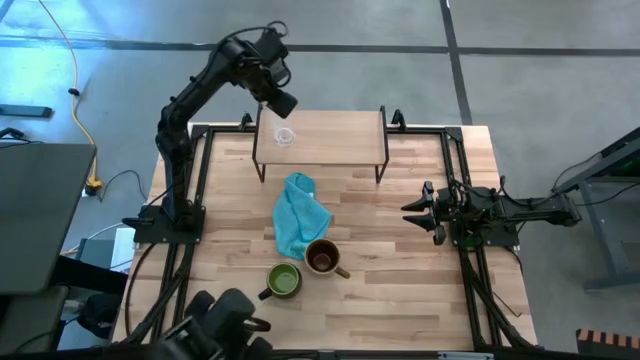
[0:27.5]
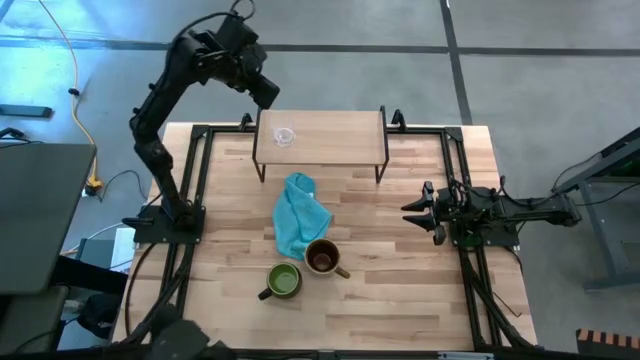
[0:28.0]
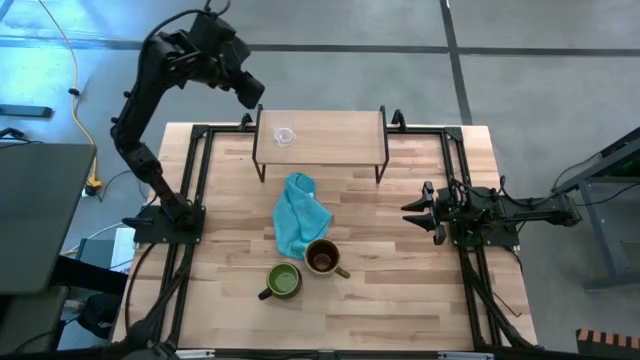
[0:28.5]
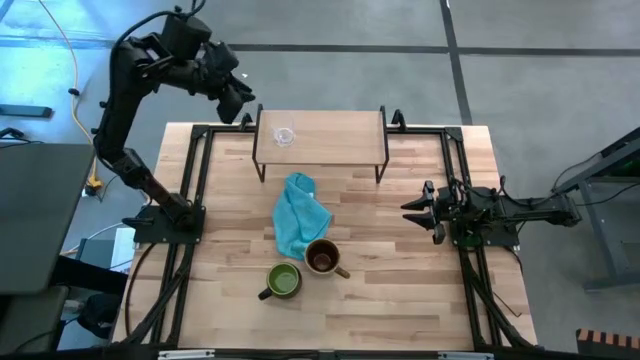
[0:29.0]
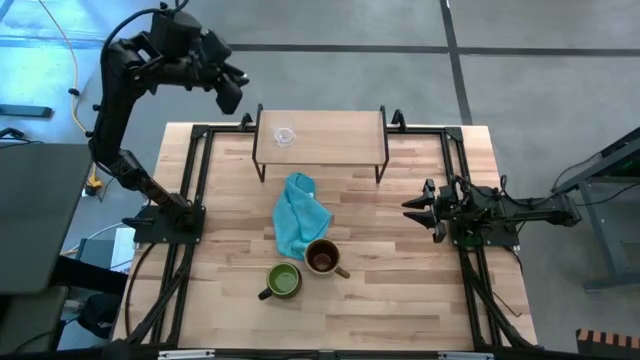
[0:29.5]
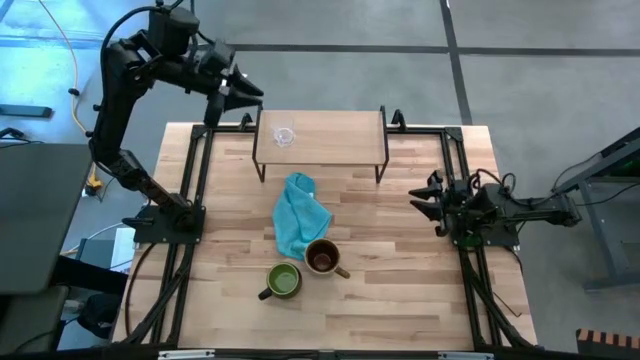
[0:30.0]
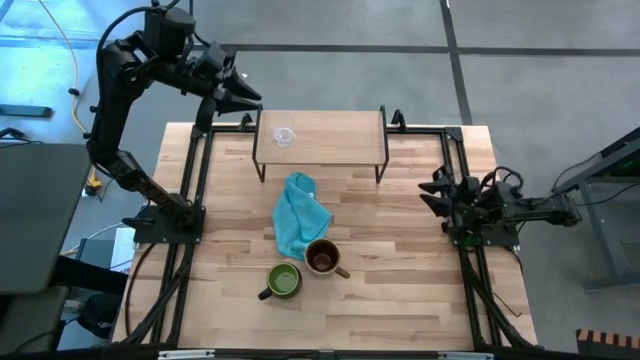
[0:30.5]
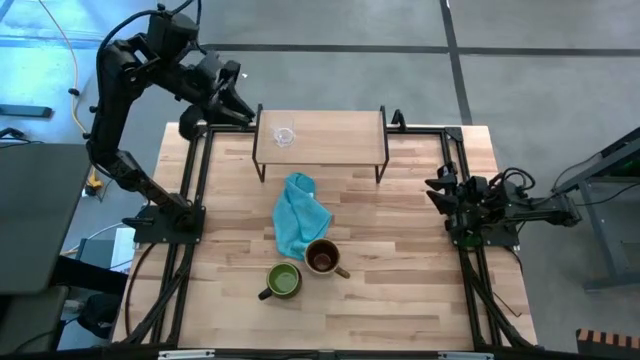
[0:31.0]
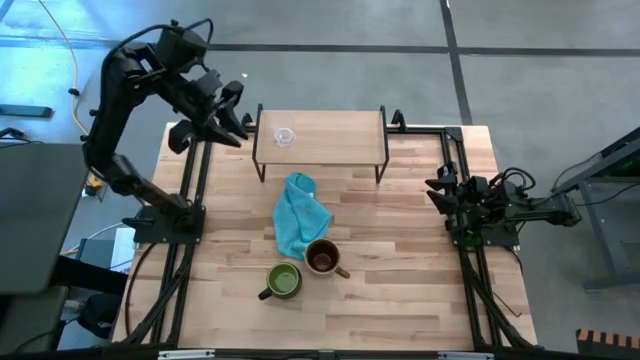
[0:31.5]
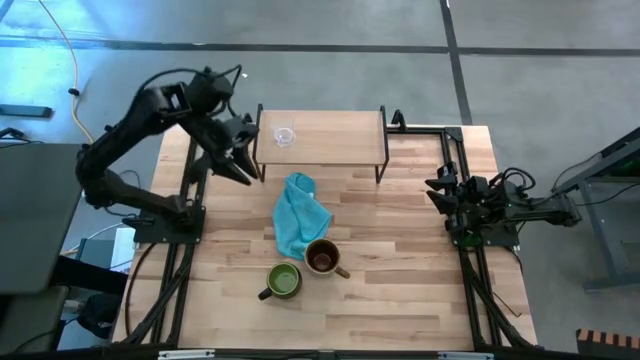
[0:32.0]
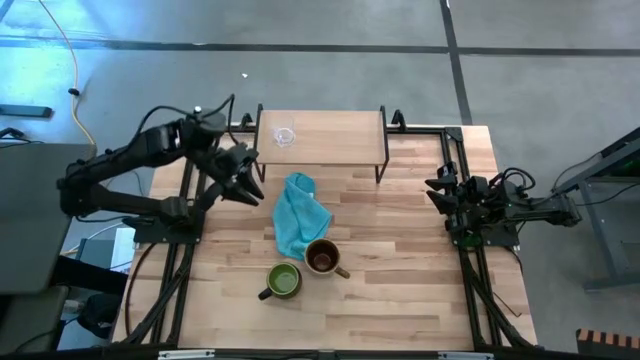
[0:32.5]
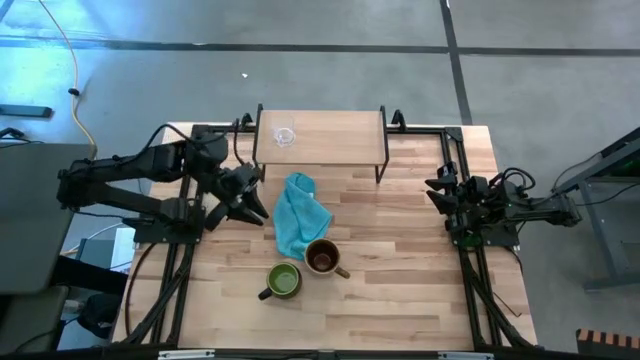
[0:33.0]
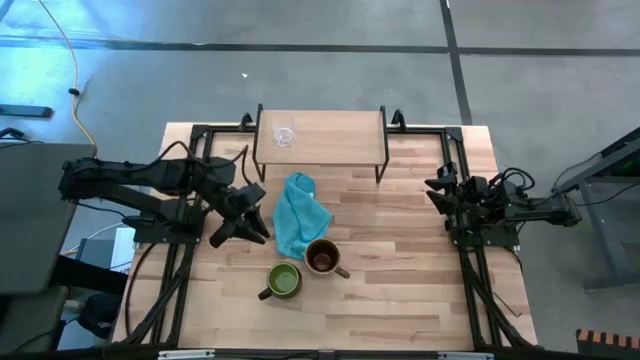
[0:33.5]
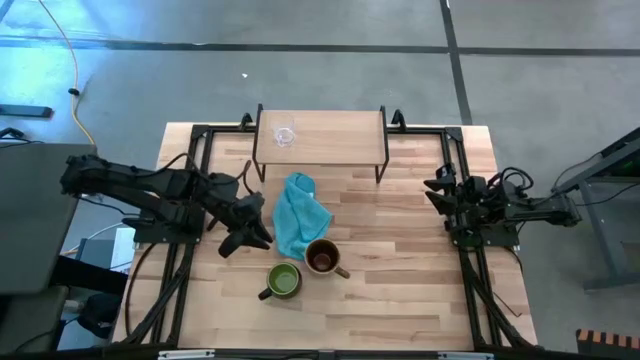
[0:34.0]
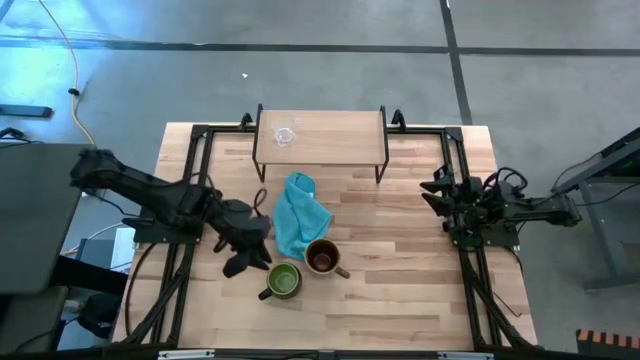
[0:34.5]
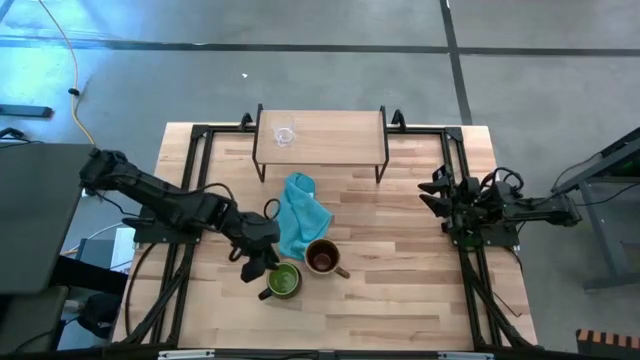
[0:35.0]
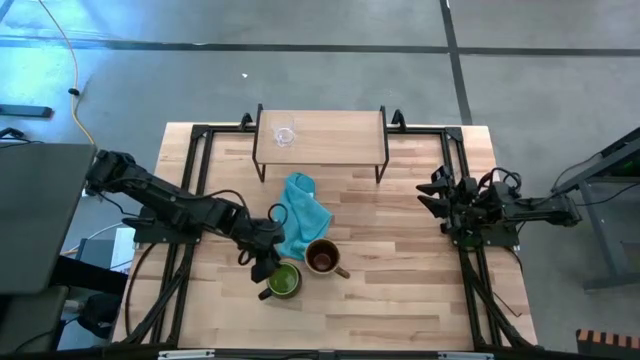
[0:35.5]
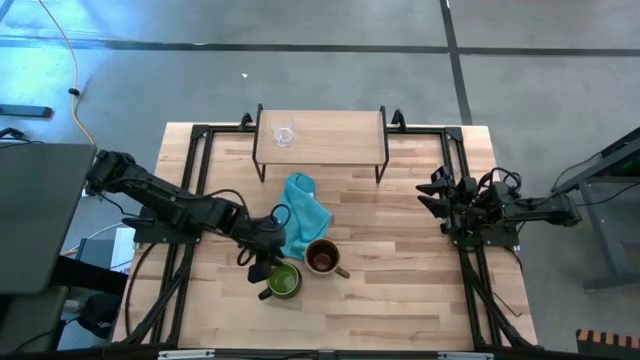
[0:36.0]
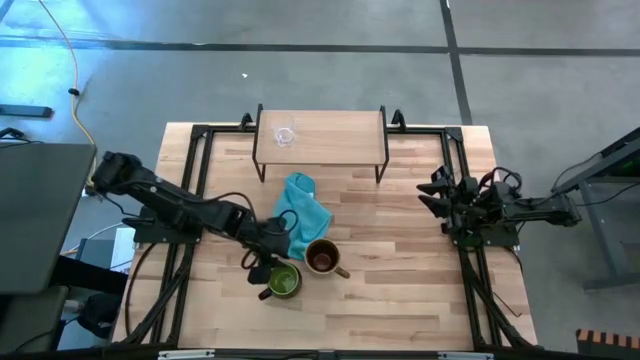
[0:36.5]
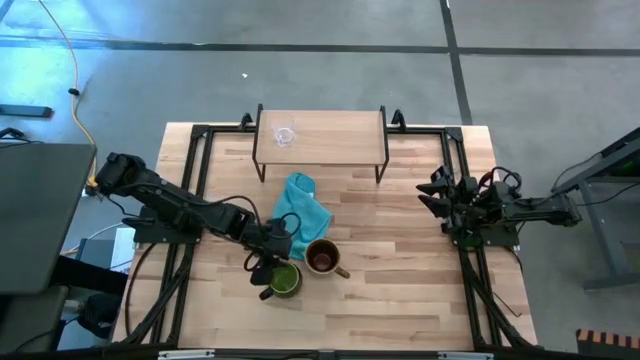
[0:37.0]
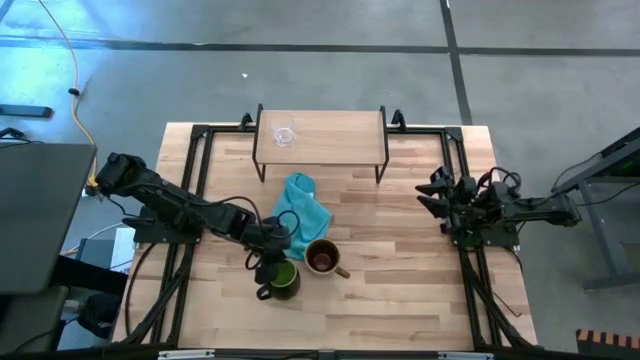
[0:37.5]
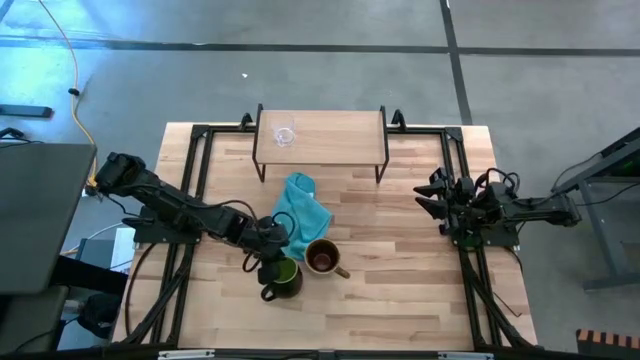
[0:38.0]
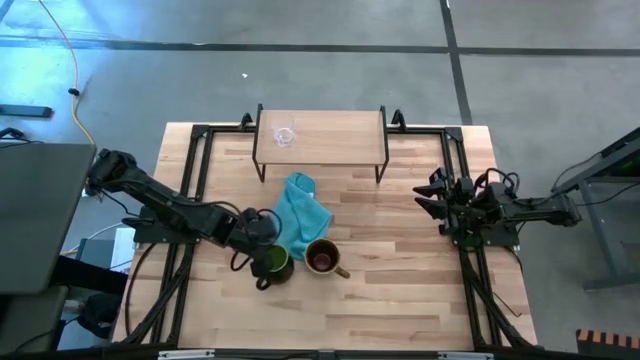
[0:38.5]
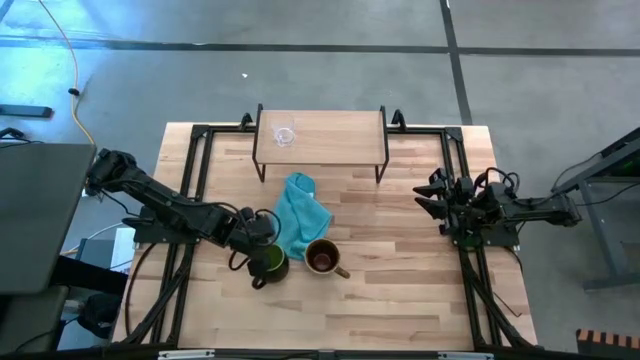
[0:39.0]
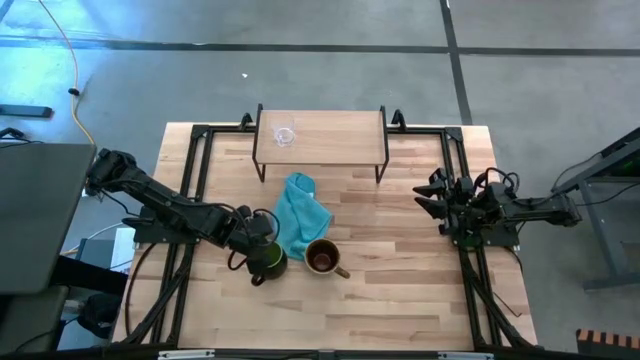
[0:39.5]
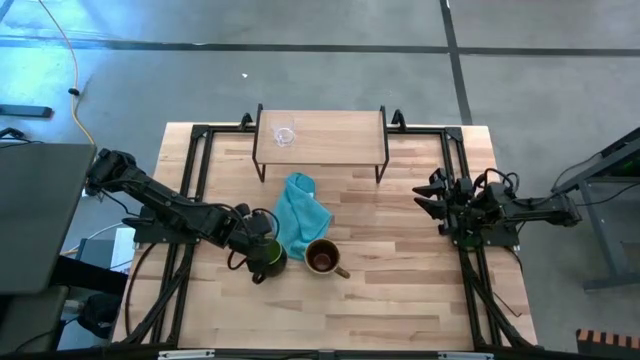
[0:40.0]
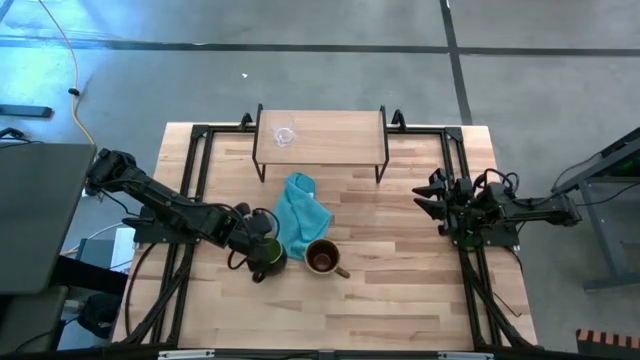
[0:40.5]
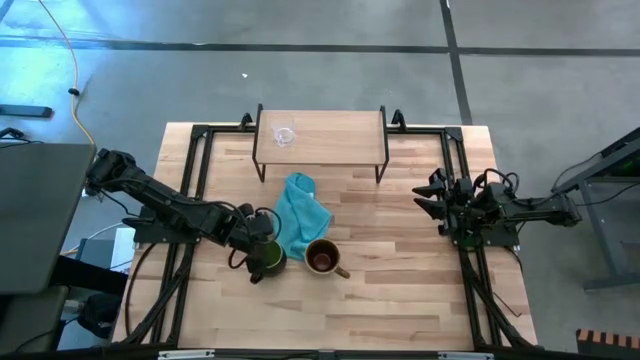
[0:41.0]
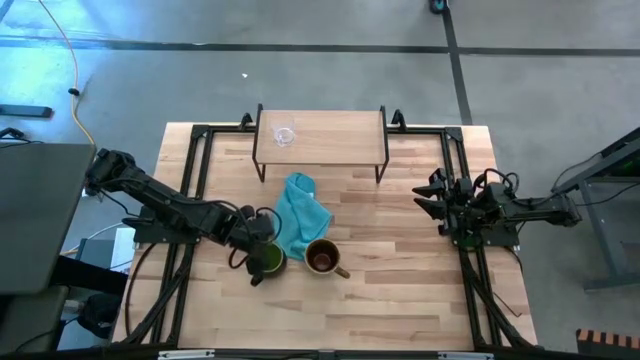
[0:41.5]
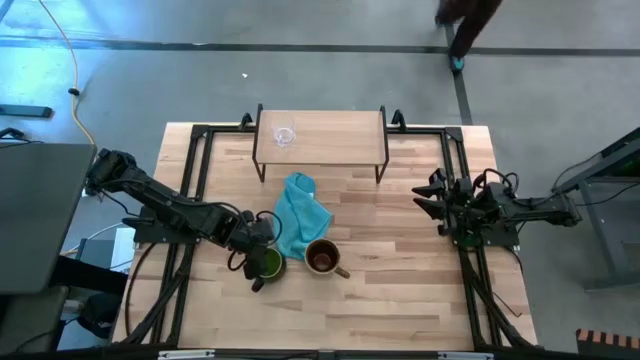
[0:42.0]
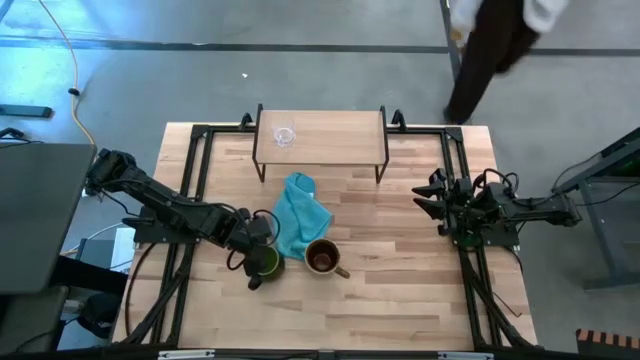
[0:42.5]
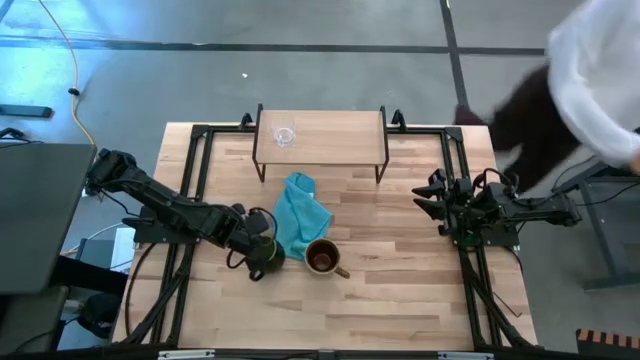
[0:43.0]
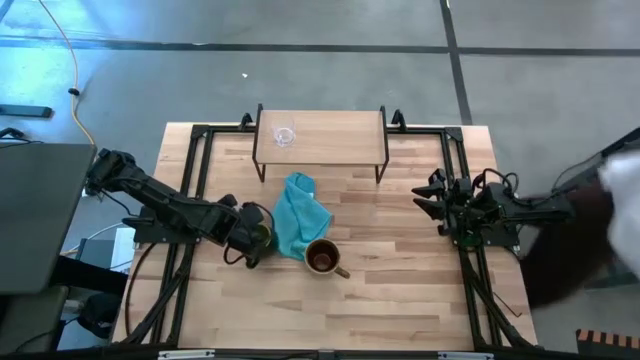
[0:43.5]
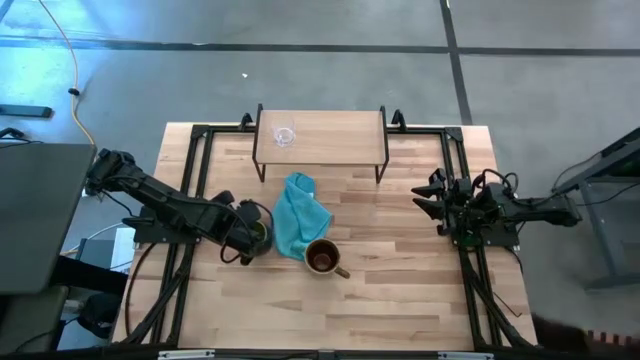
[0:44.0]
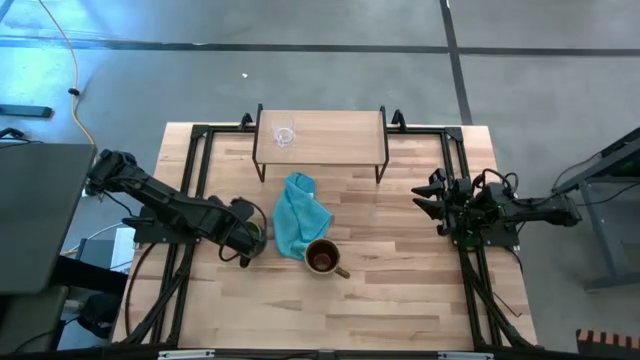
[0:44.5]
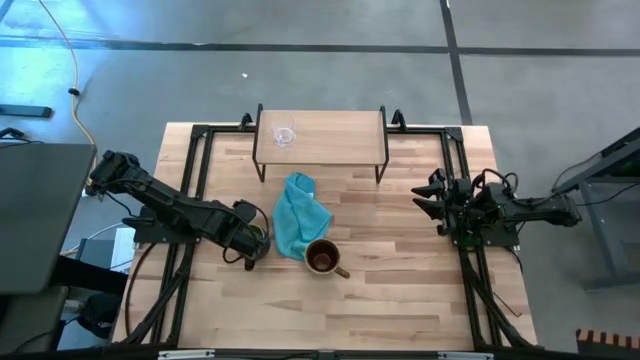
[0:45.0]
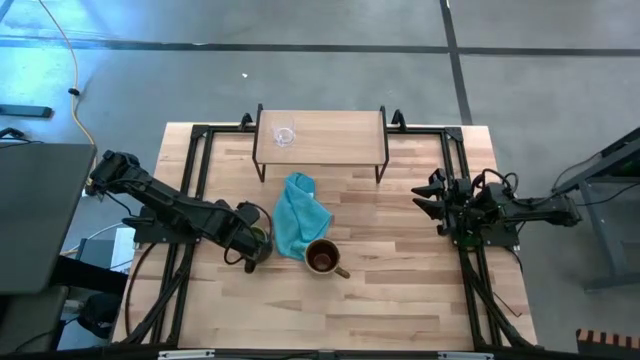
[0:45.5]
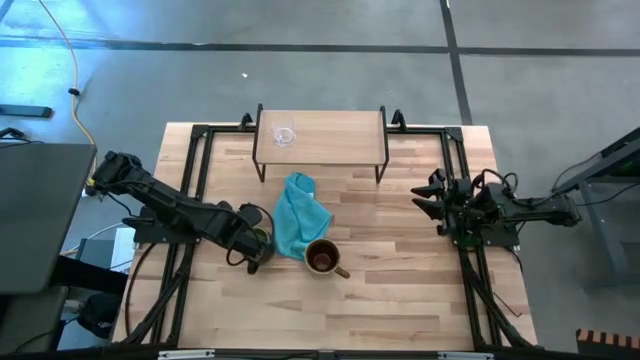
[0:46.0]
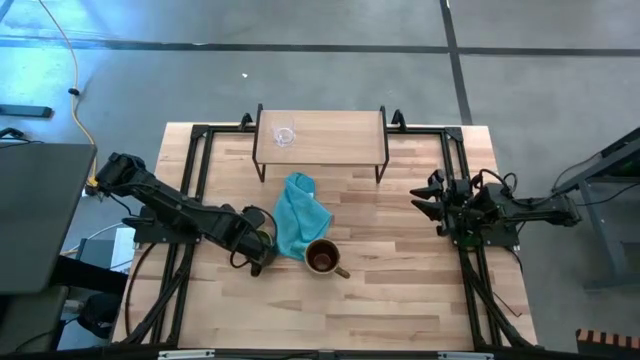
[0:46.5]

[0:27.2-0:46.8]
Task: Stack small to large cups/mugs on shelf
Put the green mug on the shelf

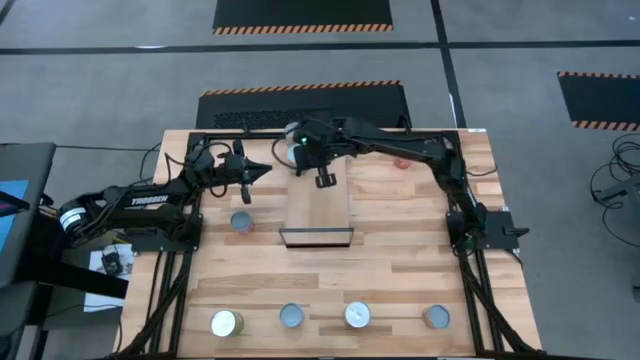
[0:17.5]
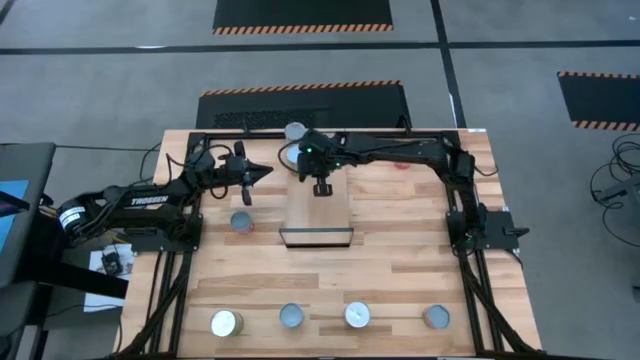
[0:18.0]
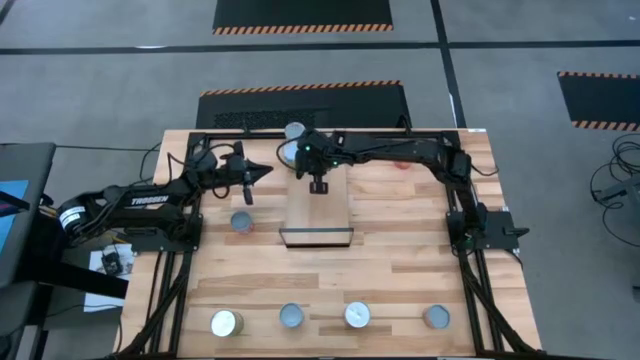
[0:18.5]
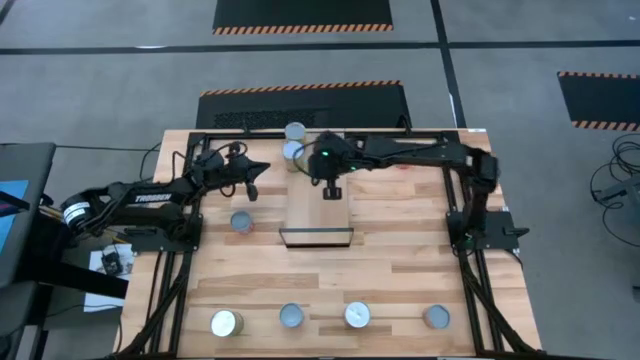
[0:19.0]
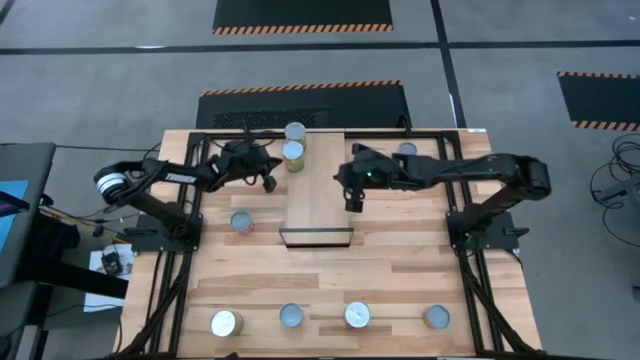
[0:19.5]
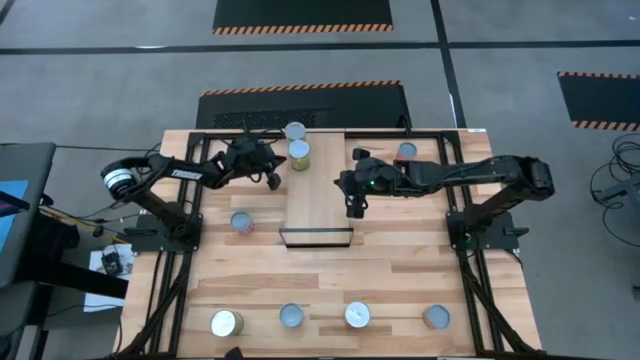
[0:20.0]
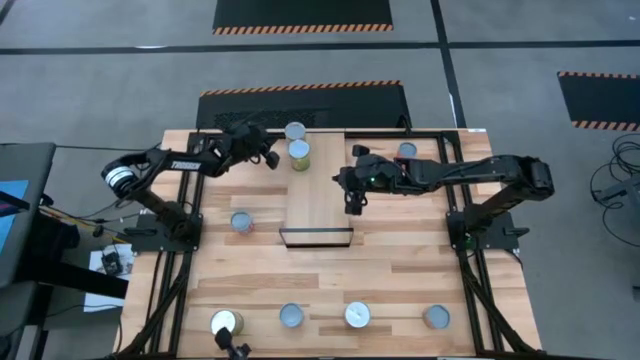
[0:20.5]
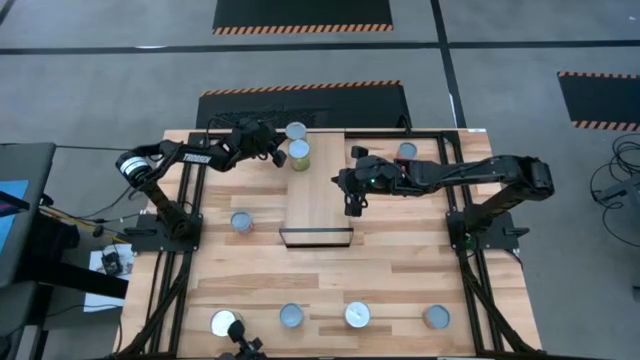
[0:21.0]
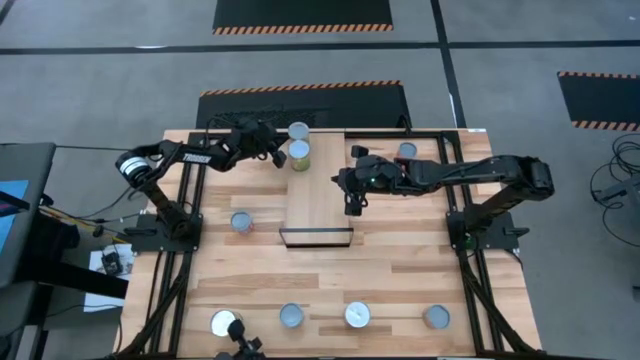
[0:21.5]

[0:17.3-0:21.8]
Task: Pick and place cans onto a shelf
Adjust the cans on the shelf
